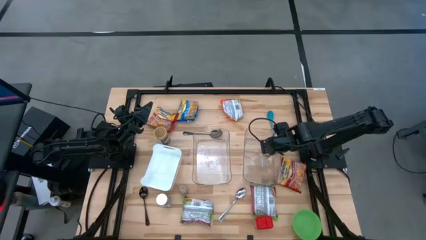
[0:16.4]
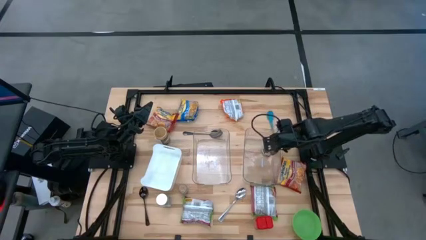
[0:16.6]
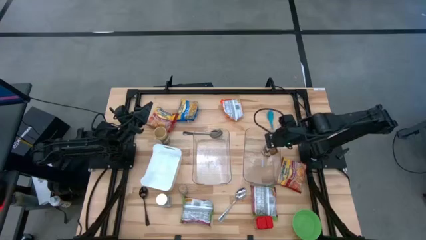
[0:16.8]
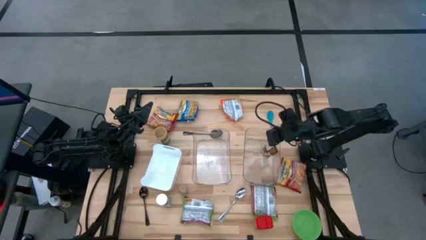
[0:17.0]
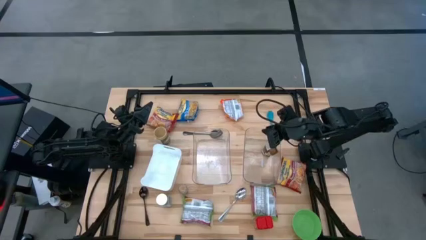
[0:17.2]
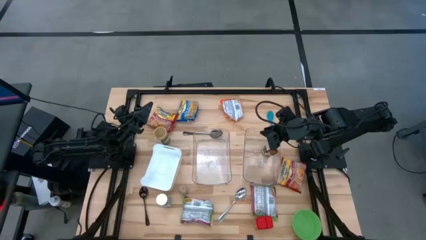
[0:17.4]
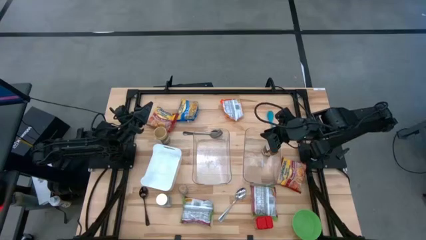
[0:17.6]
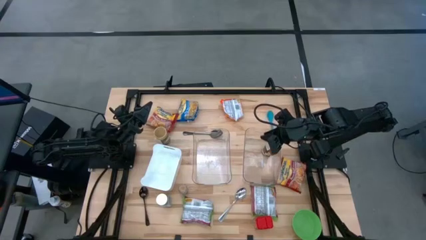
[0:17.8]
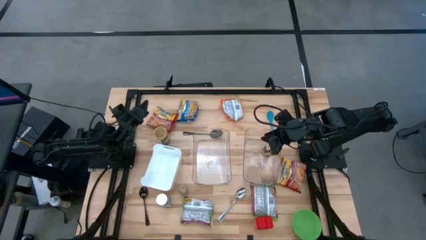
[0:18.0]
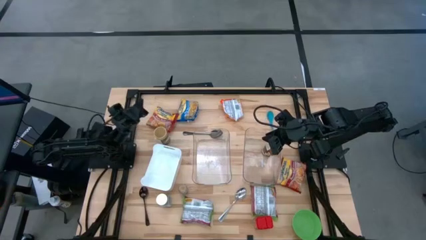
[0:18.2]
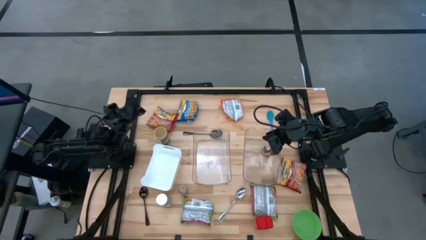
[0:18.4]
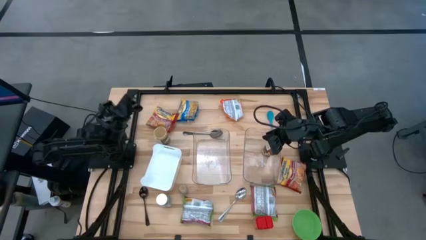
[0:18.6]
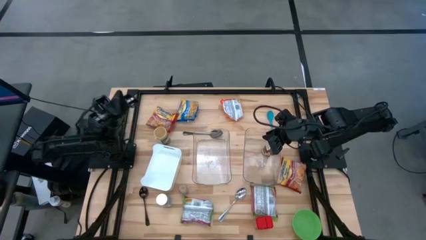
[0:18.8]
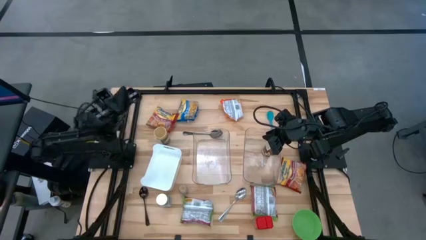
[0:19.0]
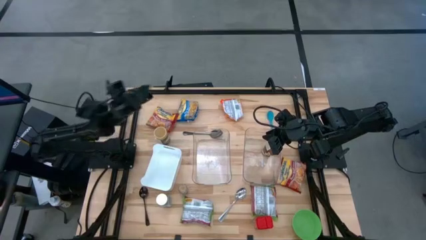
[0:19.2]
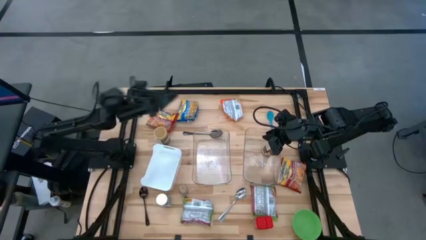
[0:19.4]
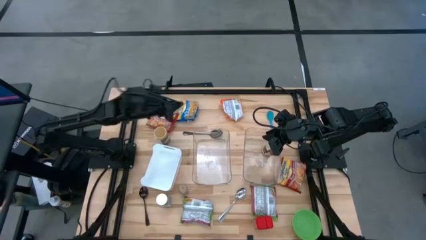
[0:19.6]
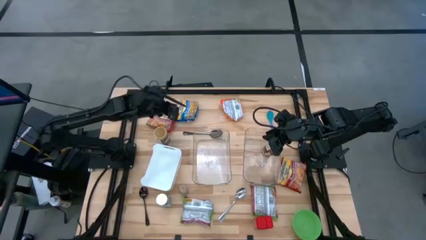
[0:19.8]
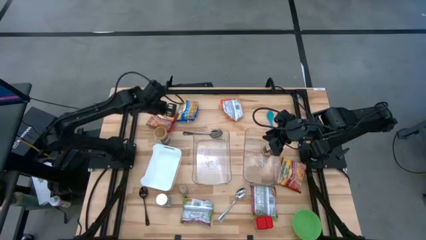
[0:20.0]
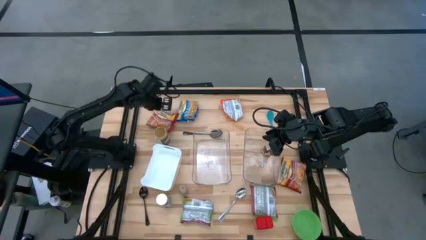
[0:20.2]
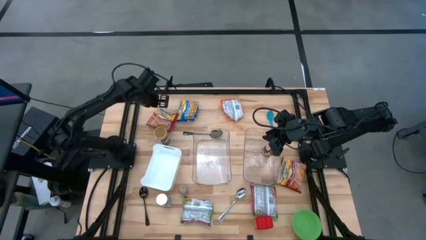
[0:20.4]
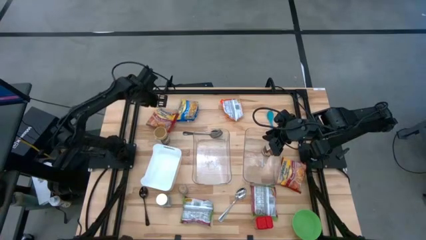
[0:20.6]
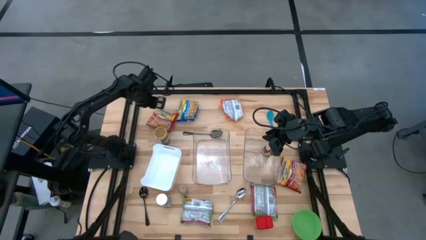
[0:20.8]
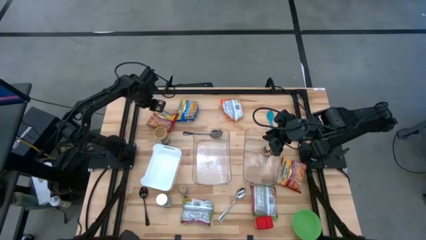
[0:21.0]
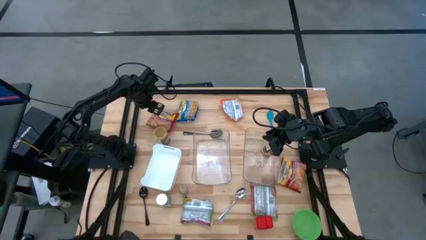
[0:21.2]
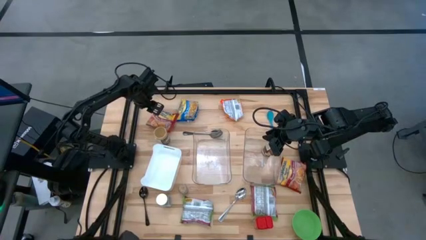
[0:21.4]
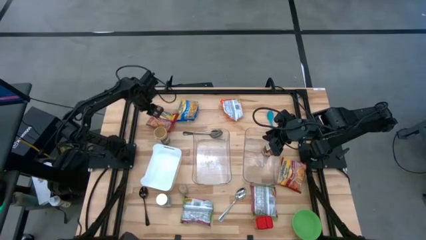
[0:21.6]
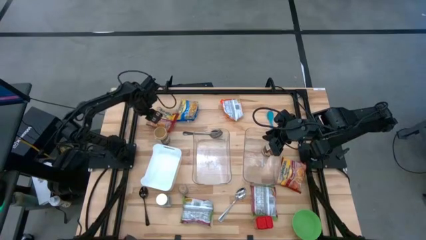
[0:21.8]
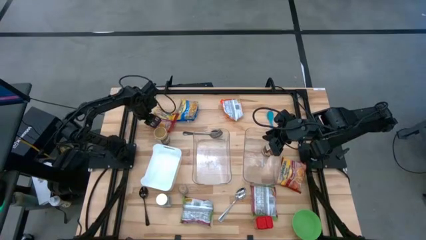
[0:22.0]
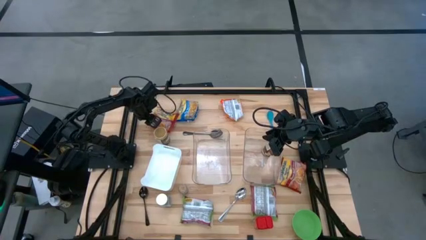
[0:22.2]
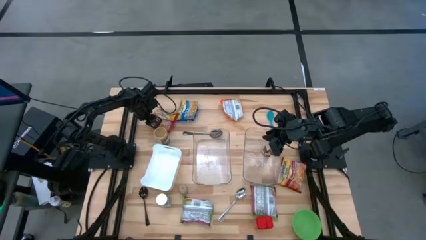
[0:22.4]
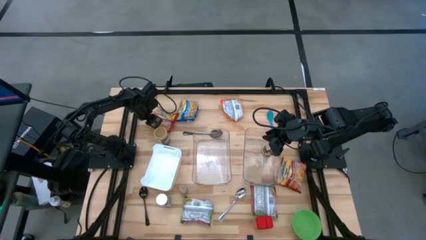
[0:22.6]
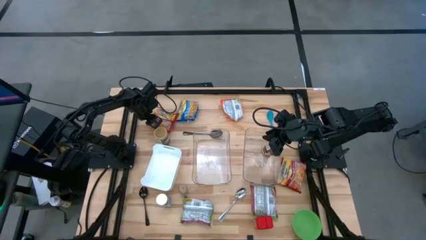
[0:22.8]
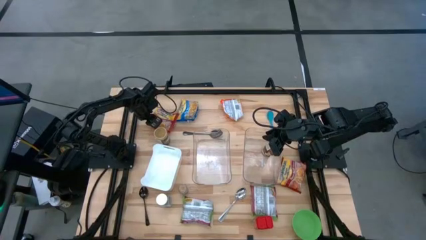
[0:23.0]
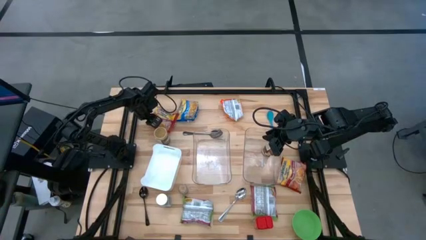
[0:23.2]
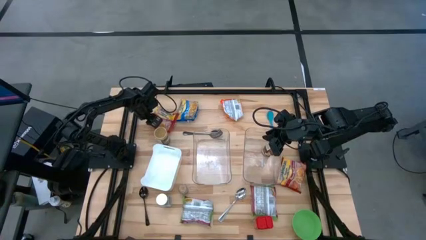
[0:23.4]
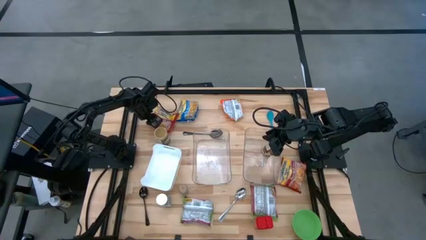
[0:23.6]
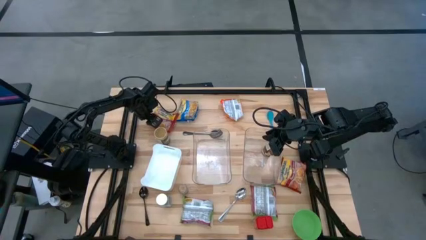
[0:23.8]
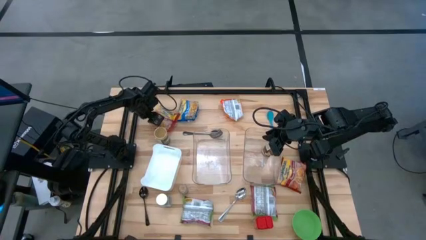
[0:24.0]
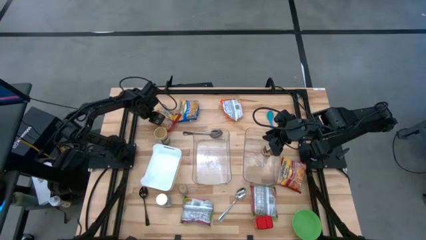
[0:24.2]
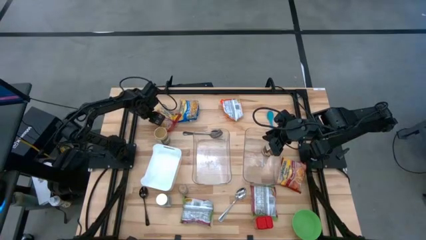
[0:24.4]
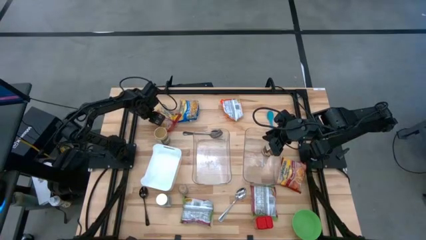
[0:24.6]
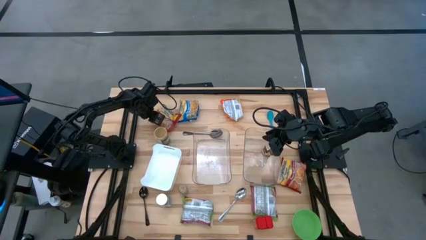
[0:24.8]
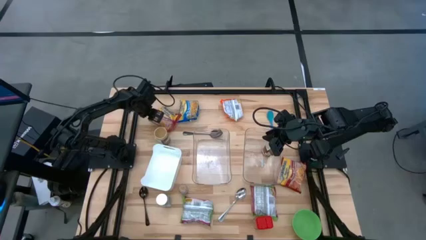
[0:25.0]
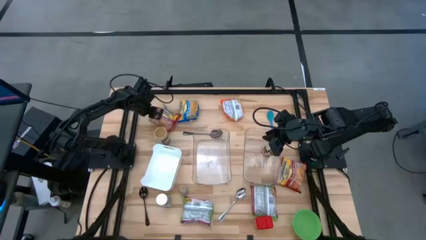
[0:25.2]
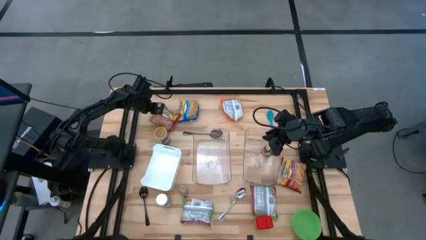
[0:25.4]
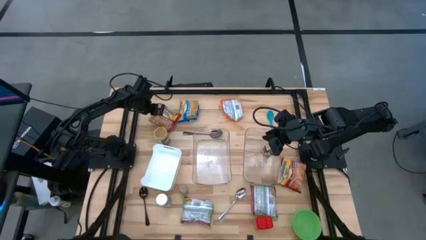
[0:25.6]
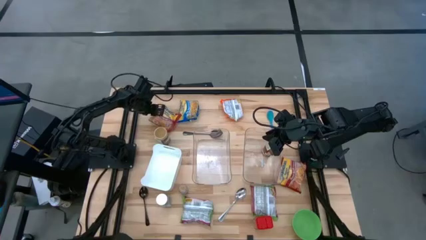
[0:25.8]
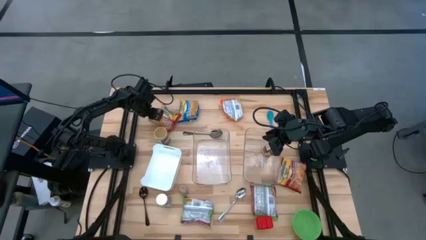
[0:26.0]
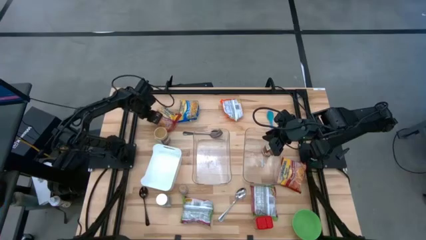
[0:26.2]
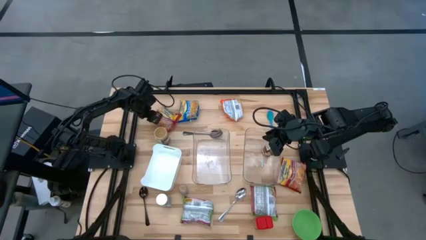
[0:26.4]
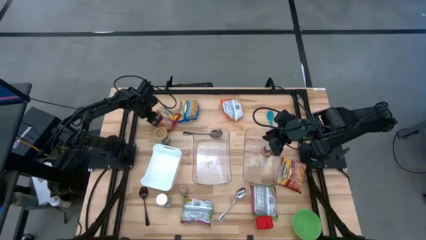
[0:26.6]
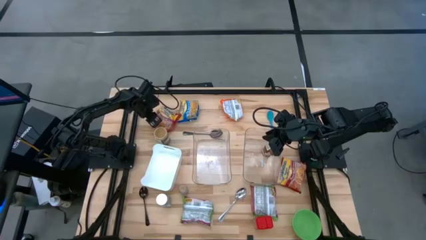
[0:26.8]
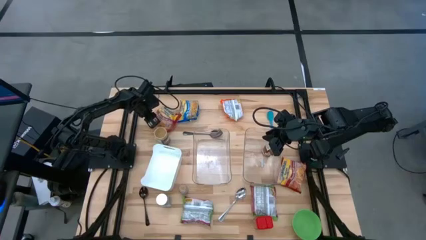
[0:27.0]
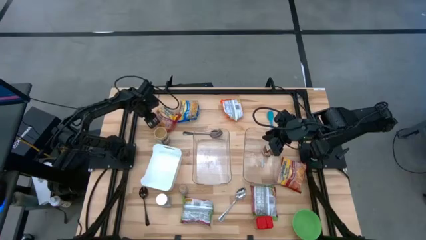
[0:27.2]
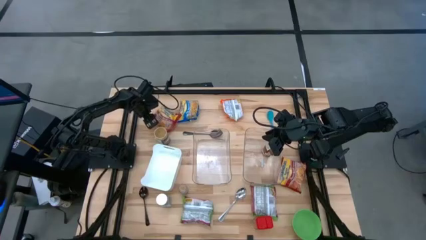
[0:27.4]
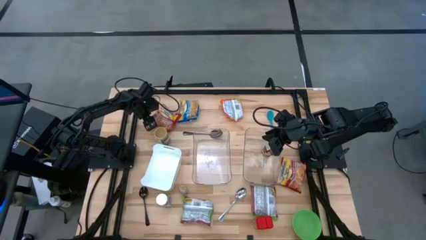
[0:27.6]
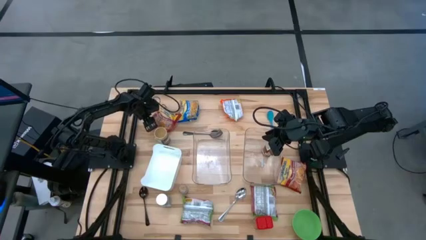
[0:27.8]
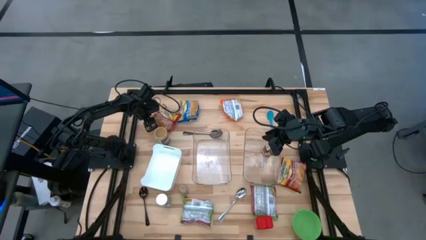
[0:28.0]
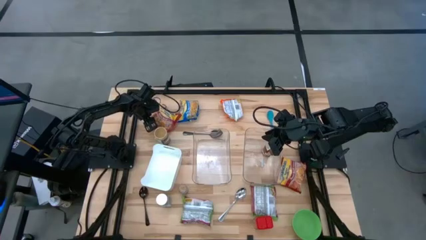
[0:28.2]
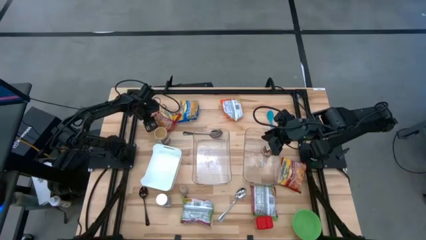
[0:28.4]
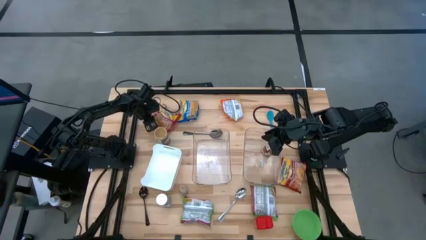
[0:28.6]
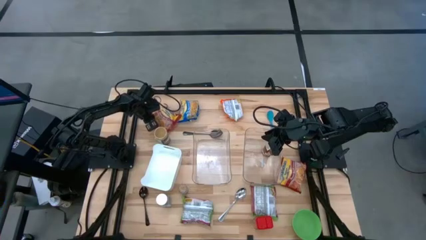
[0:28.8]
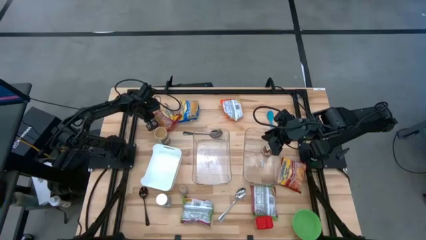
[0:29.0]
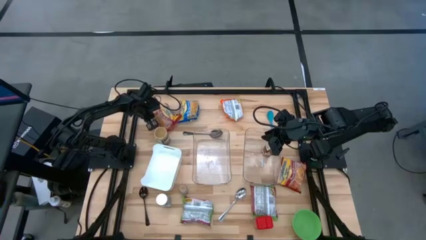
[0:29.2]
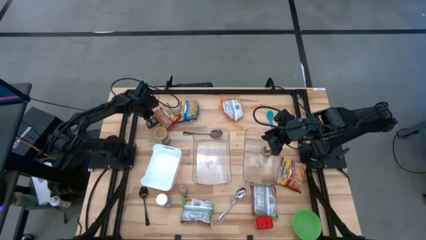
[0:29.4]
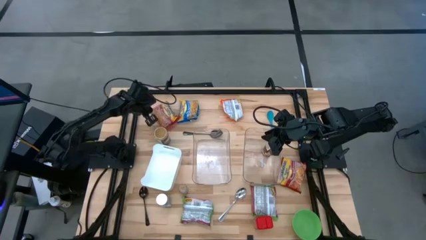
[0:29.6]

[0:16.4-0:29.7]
Task: Pick & Place Food Item
Put the top red noodle pack into the left transparent bin
